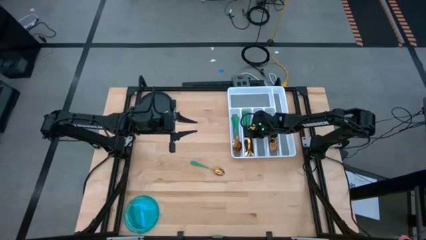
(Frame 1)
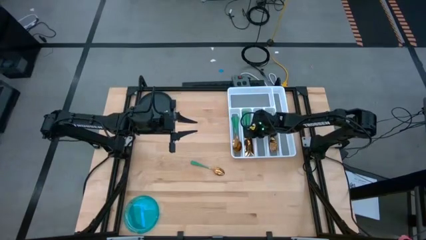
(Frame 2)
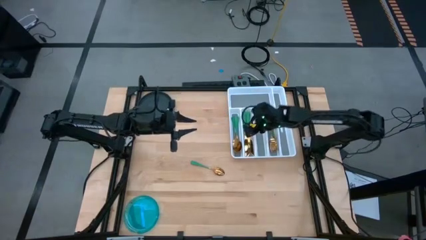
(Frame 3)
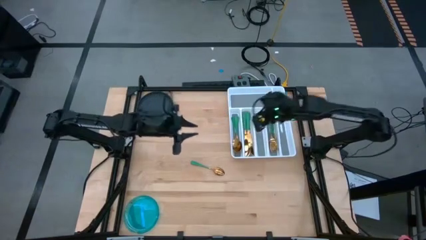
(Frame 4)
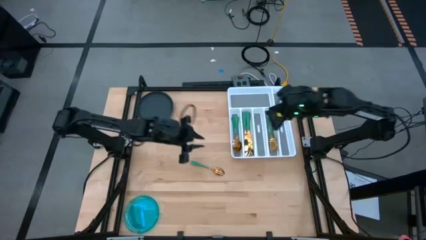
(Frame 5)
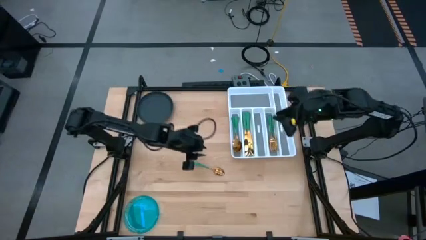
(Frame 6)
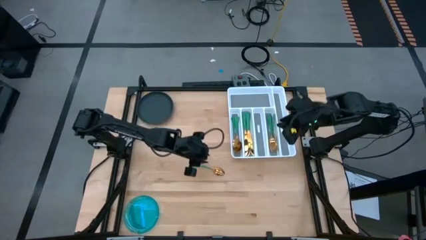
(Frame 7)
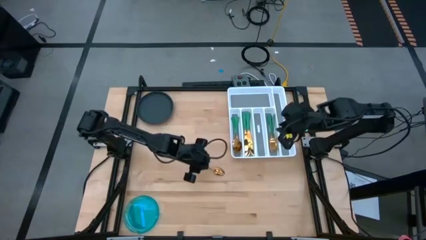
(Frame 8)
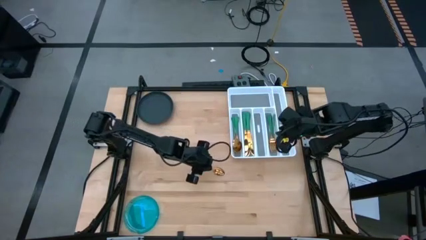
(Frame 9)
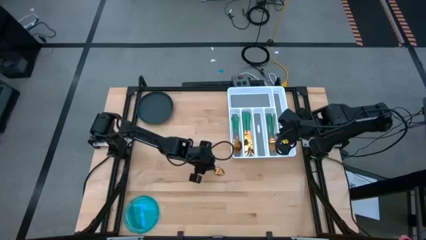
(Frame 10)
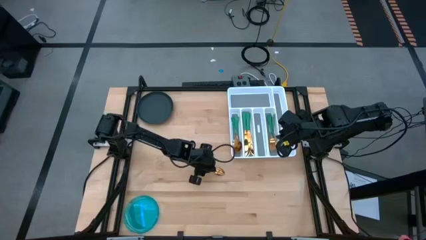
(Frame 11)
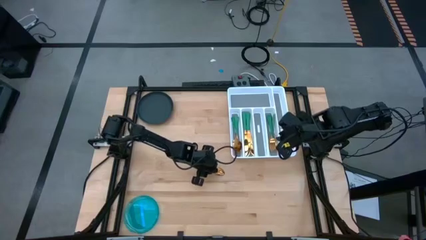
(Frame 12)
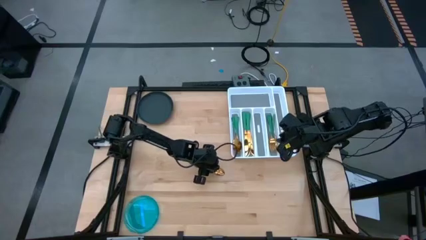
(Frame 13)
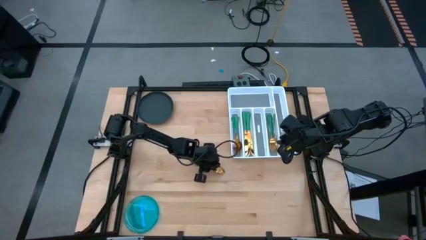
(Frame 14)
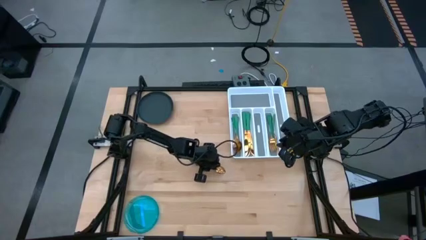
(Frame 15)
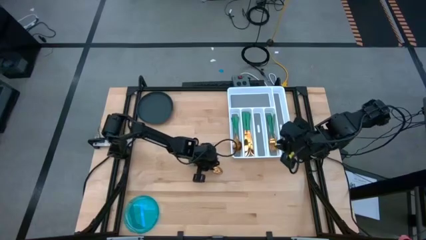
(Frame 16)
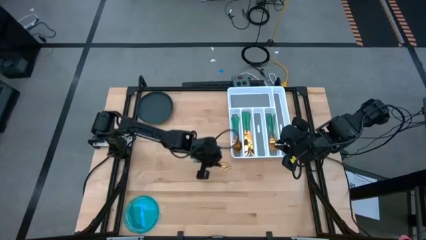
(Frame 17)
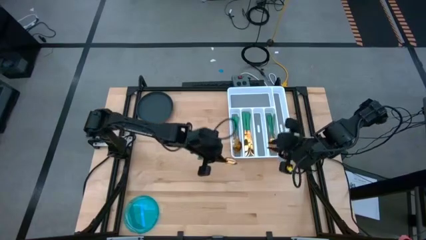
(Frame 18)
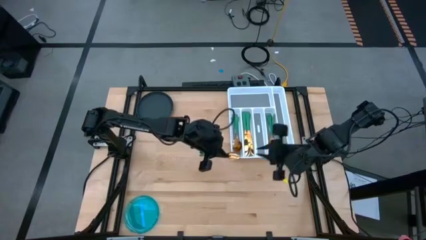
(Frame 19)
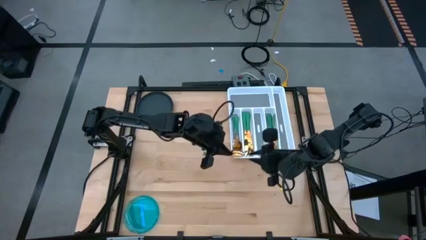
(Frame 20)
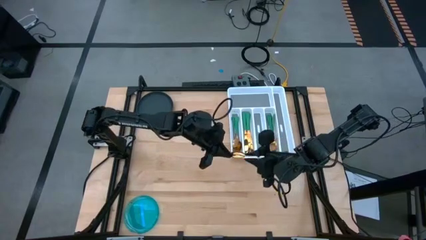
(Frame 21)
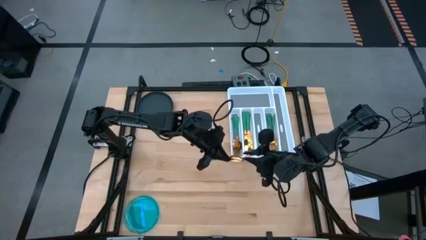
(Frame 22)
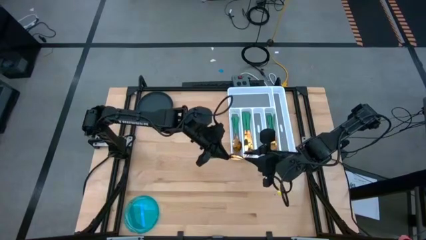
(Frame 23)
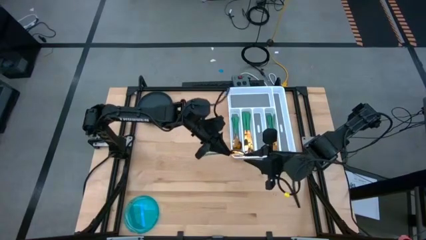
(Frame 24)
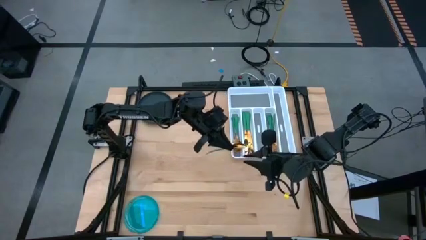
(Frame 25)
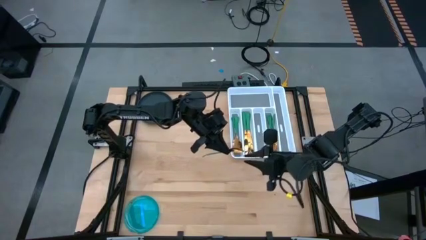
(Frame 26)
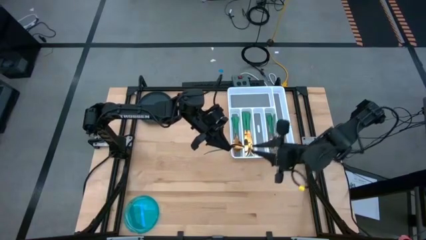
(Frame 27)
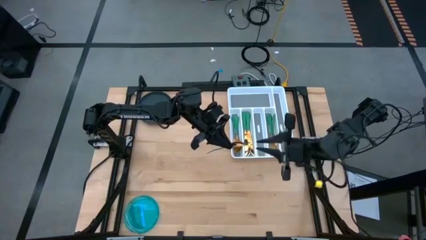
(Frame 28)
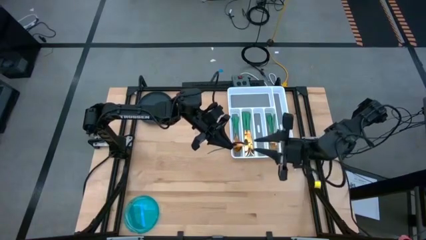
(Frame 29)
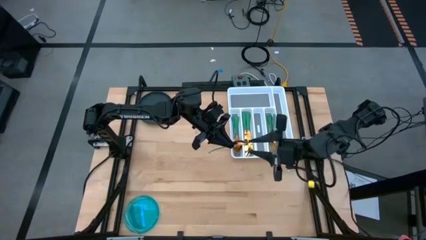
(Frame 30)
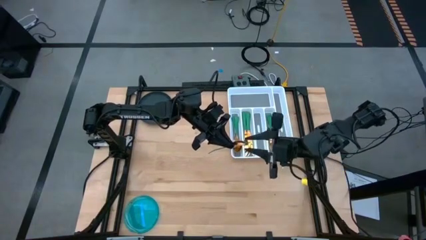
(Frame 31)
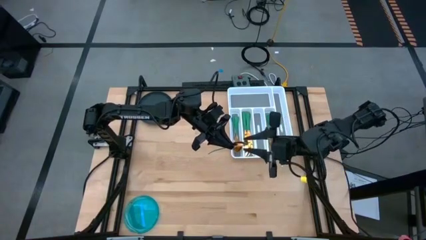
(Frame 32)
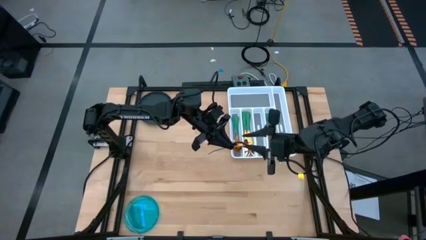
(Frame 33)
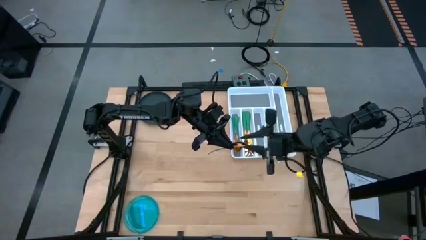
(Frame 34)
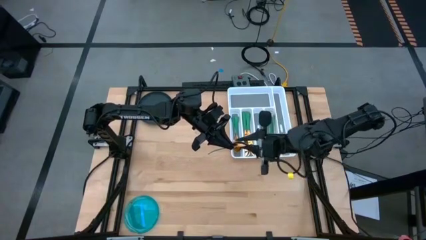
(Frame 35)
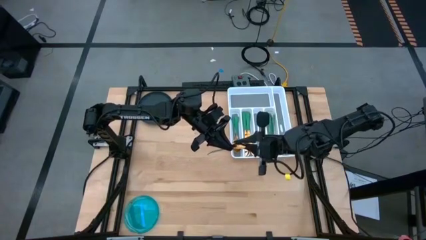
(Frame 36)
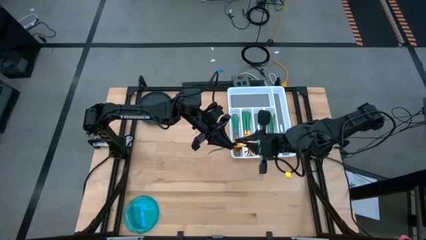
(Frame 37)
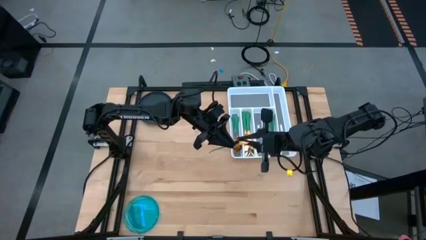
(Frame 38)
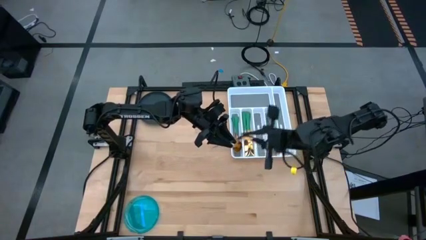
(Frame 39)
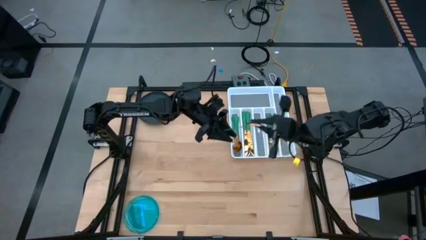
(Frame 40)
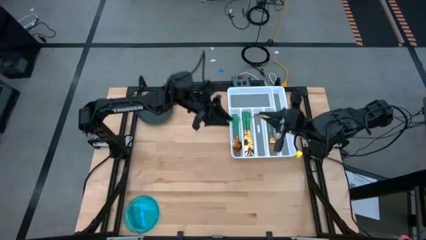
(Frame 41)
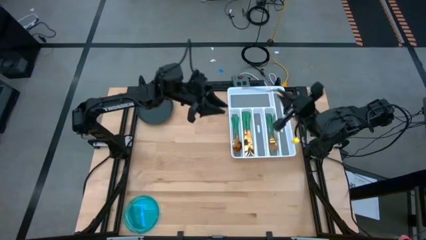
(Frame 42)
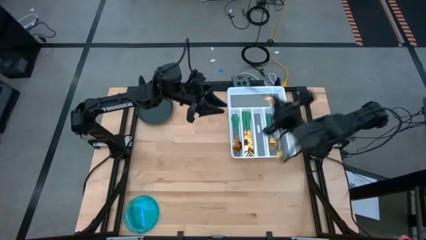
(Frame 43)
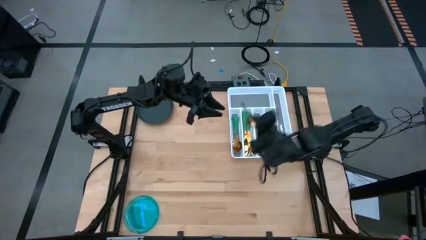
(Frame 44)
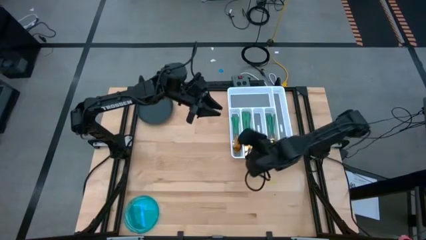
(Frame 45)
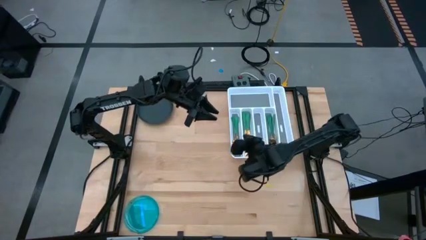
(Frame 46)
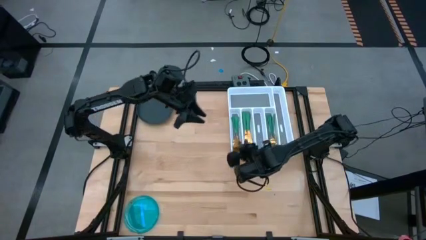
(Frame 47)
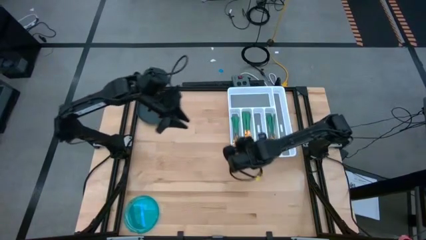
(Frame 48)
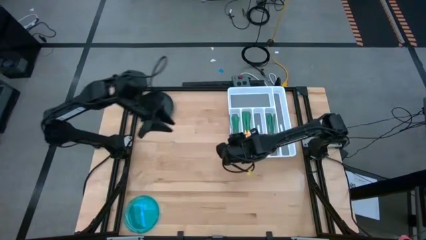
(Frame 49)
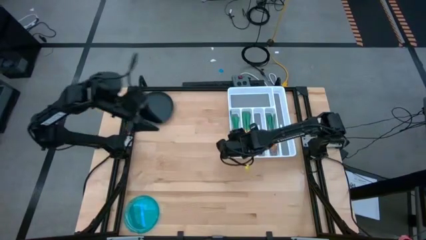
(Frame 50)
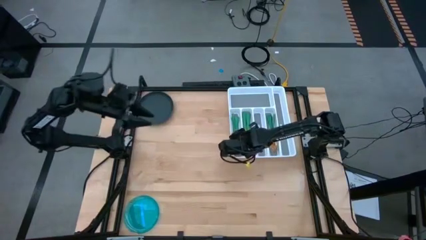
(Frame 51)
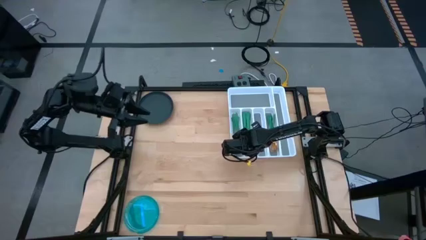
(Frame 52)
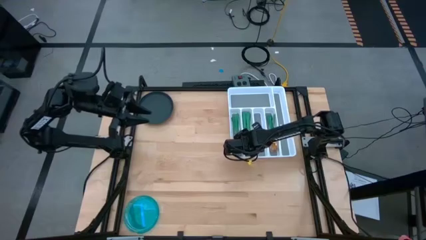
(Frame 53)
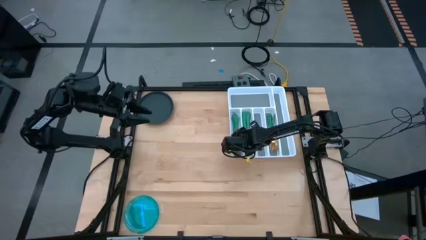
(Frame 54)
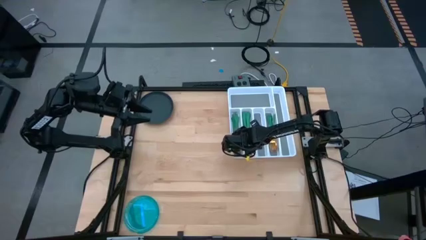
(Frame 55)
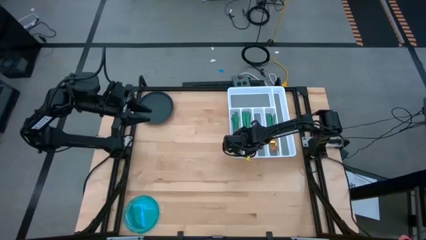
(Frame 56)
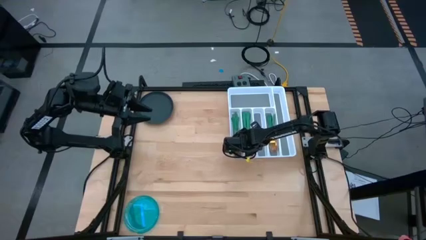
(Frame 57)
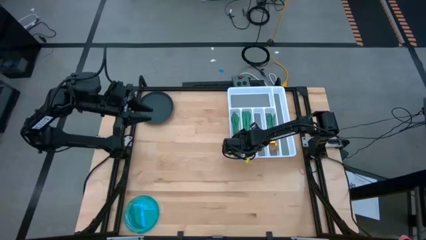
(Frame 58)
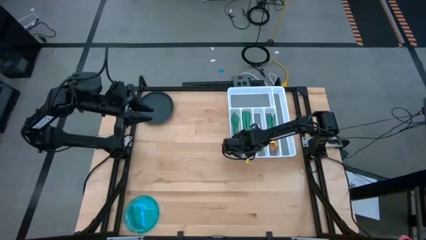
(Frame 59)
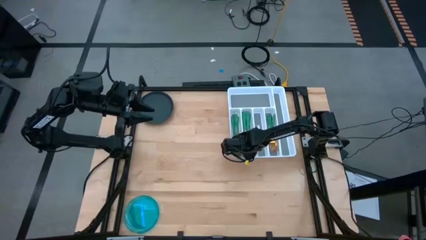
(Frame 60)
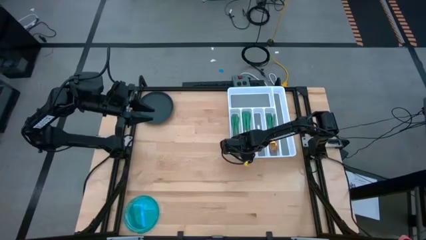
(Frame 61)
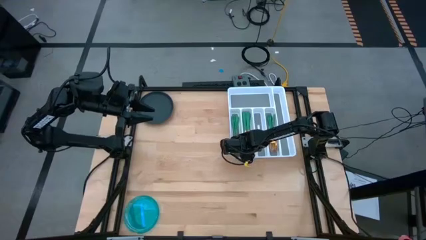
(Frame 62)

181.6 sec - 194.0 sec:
Task: Sort silverware
Put the green spoon on the silverware tray with the other green spoons
